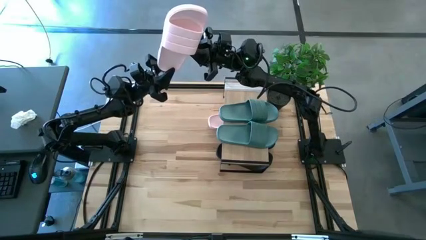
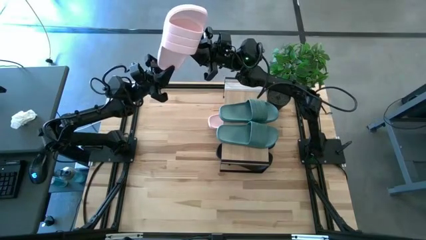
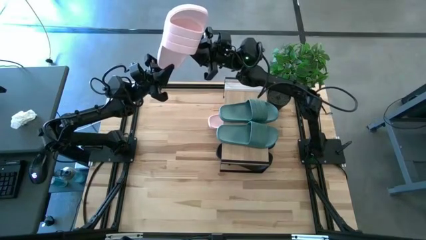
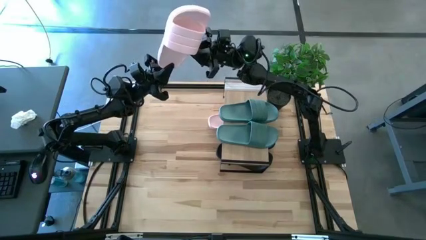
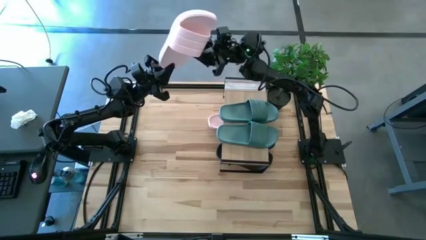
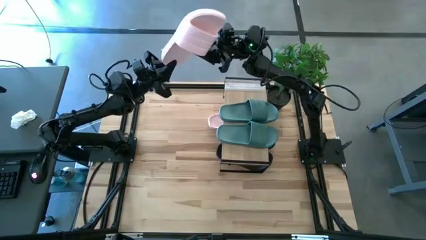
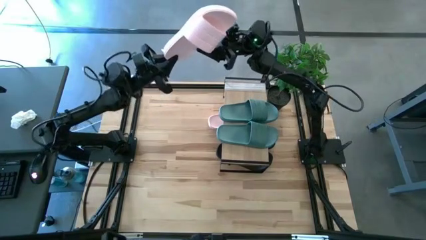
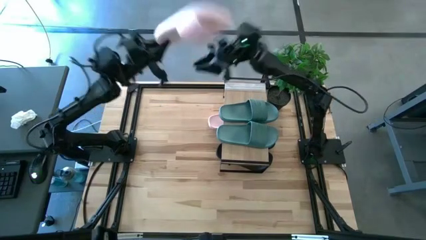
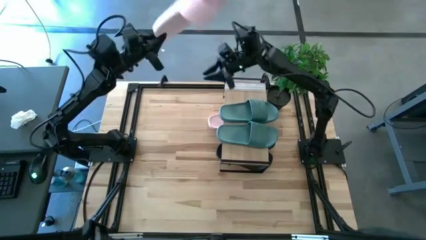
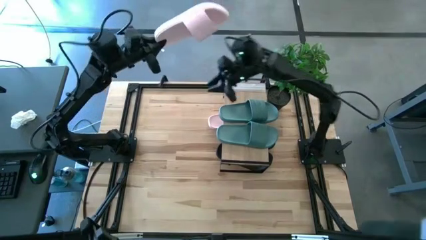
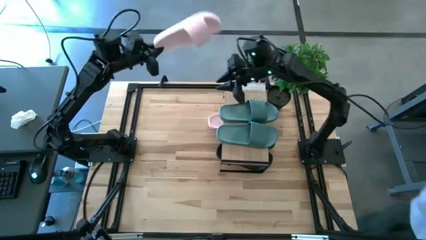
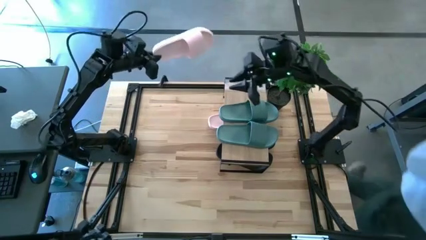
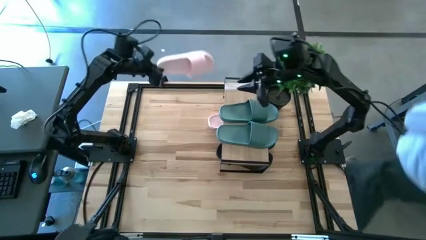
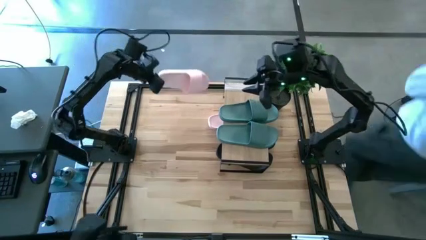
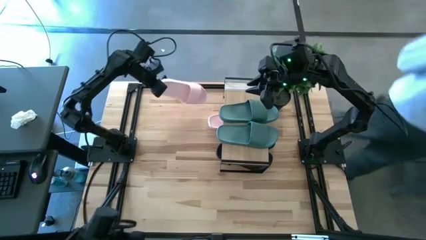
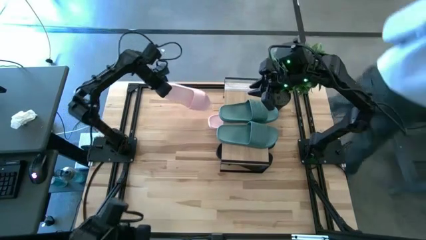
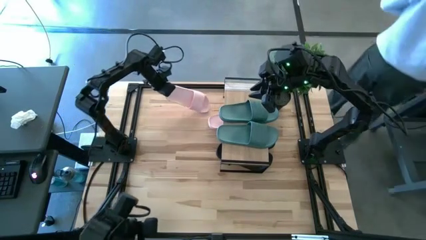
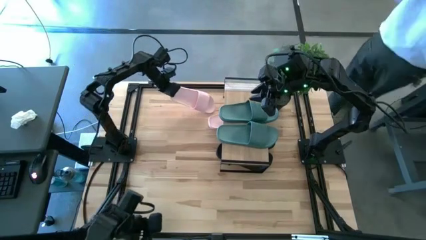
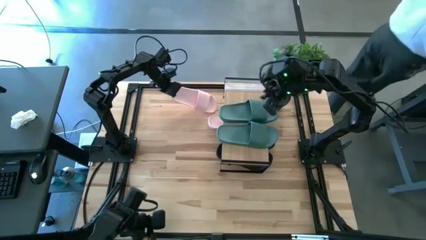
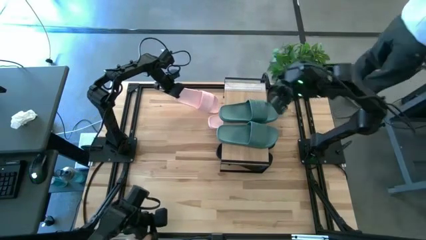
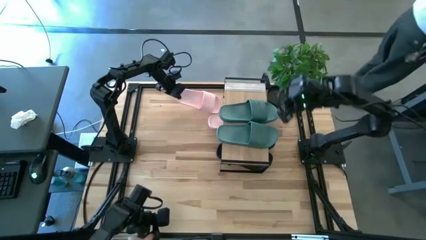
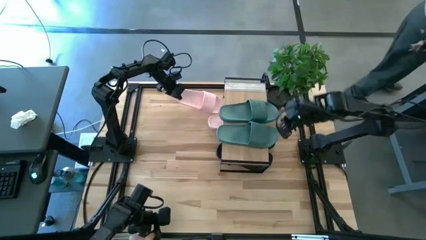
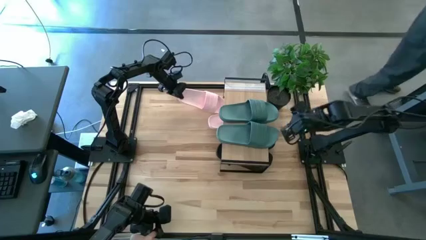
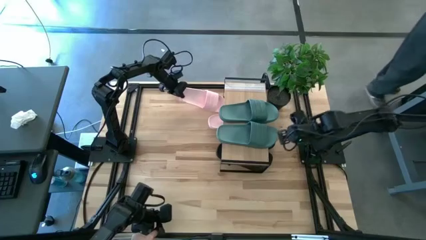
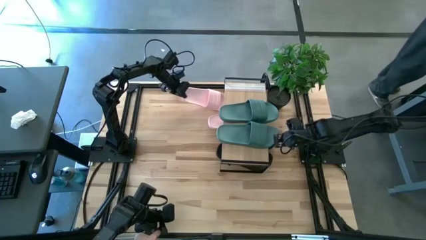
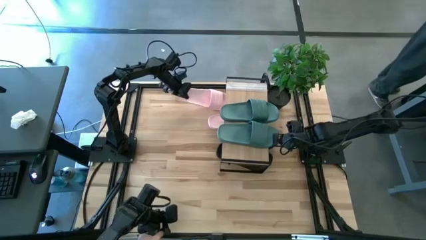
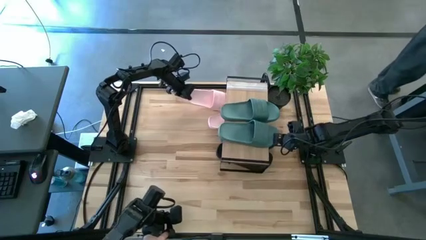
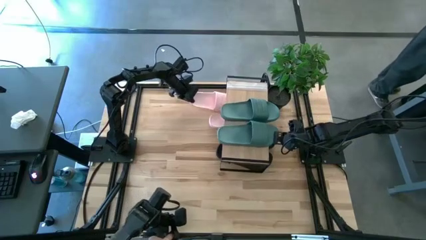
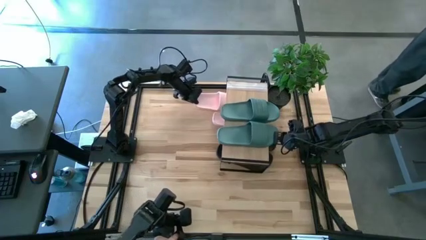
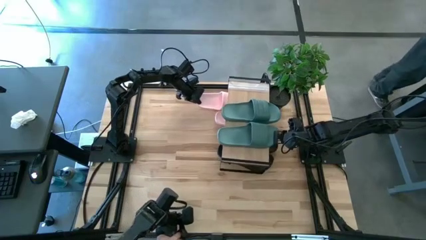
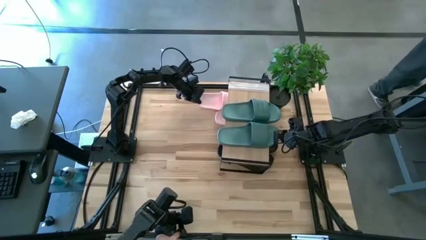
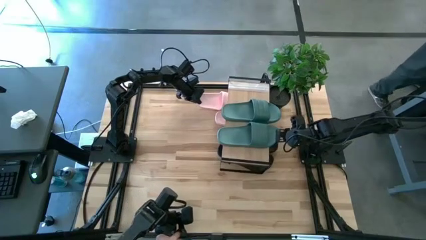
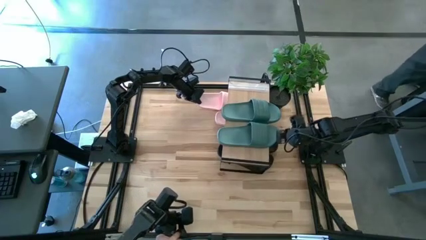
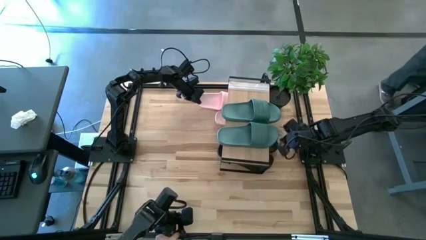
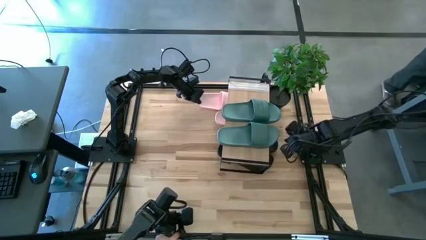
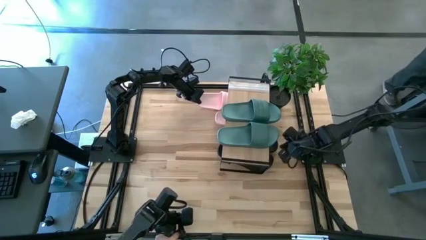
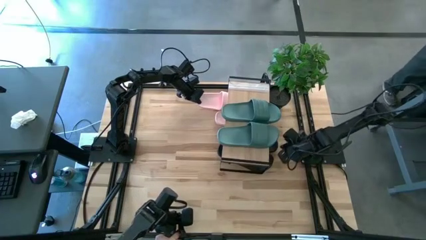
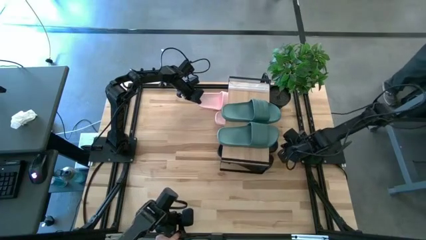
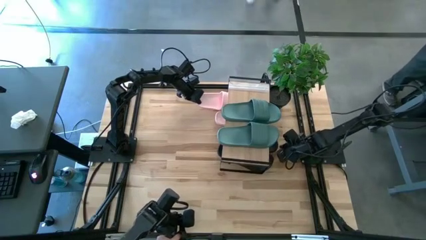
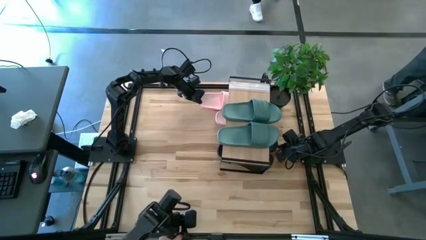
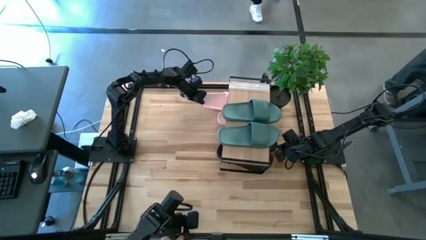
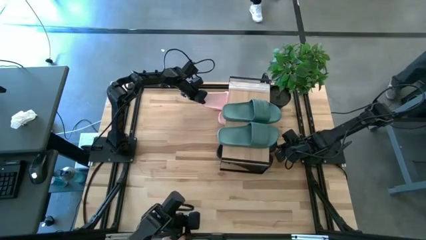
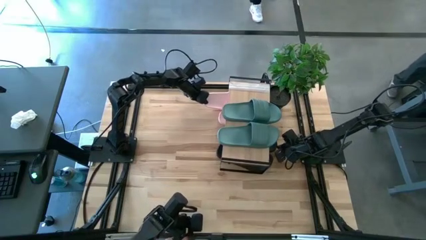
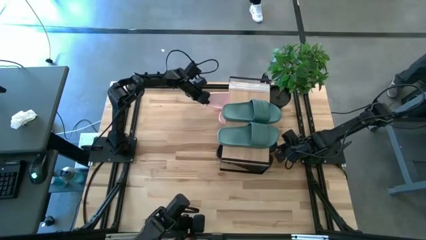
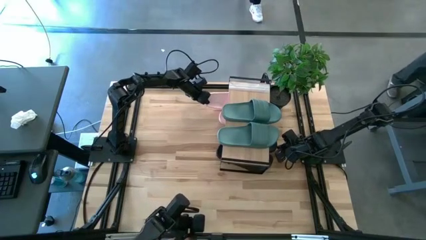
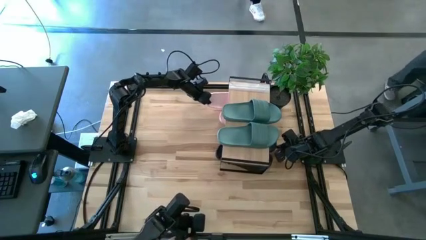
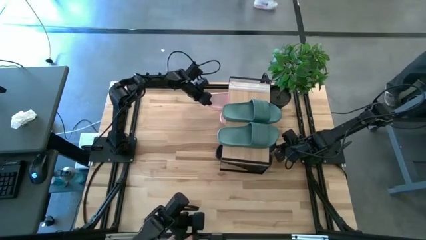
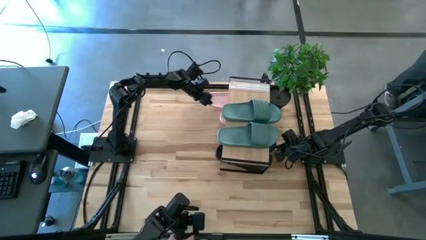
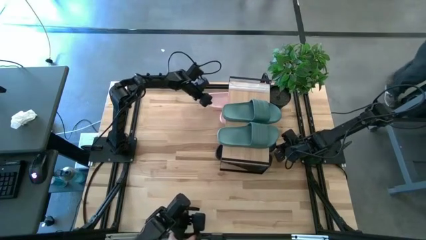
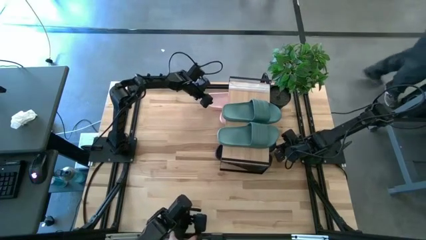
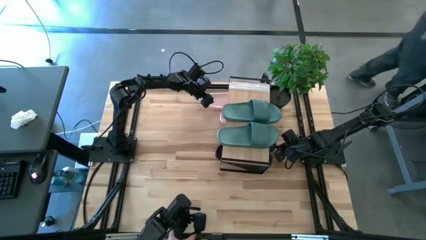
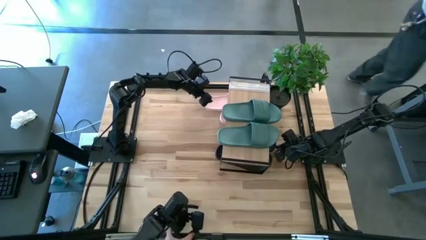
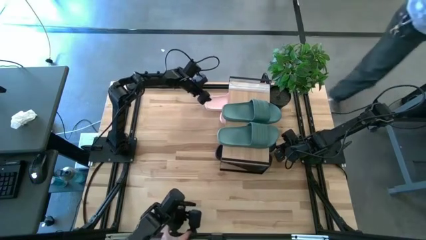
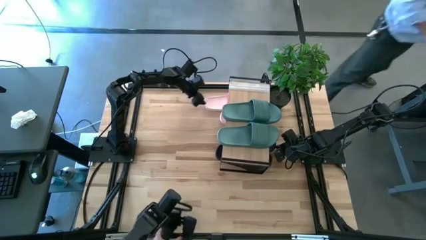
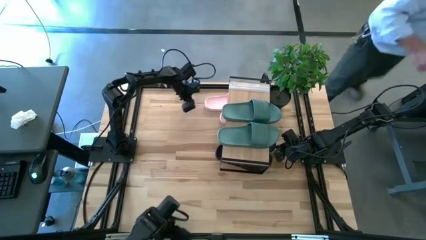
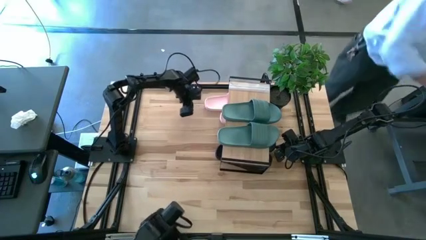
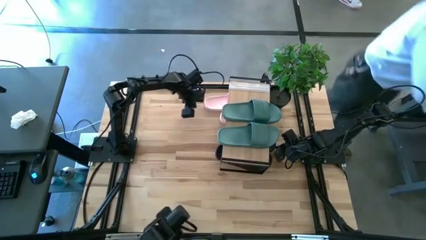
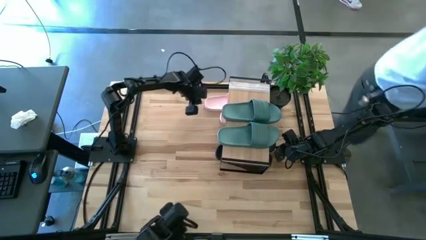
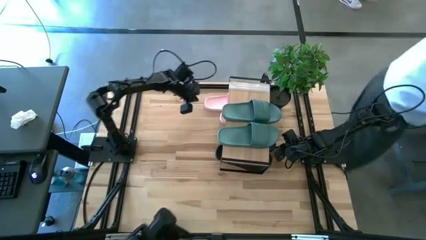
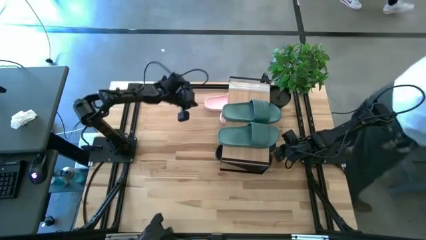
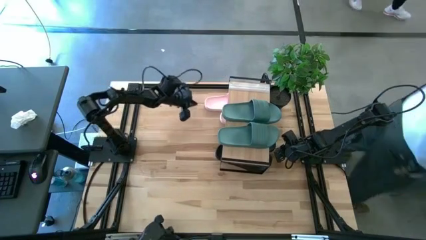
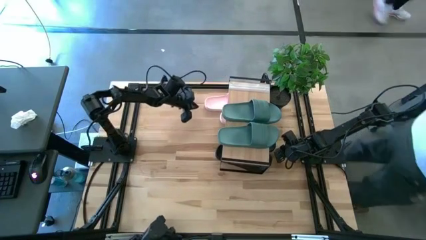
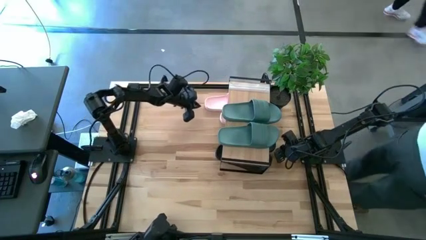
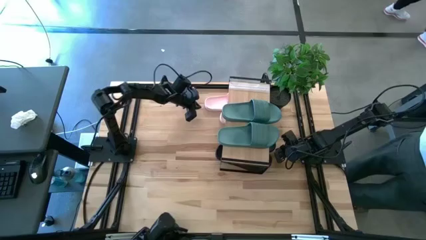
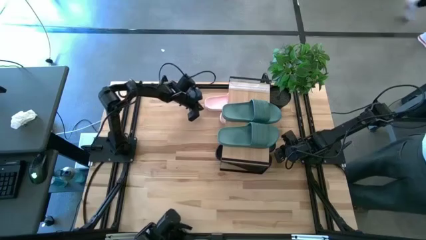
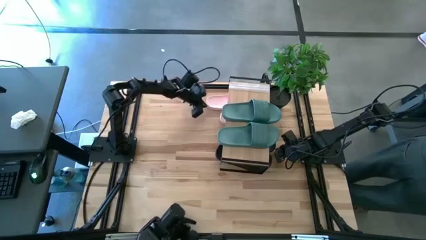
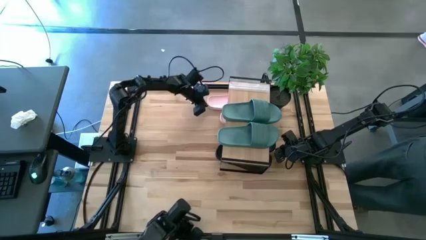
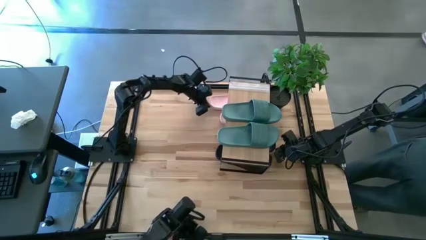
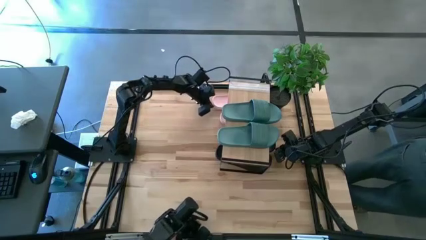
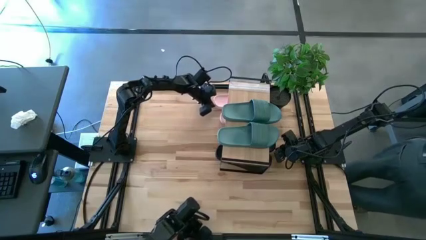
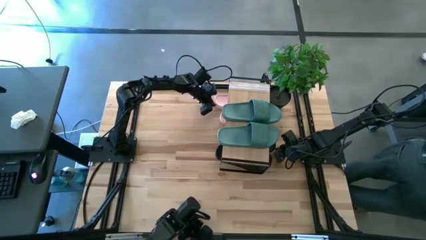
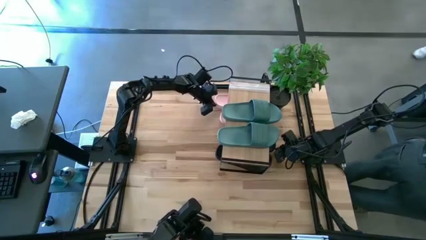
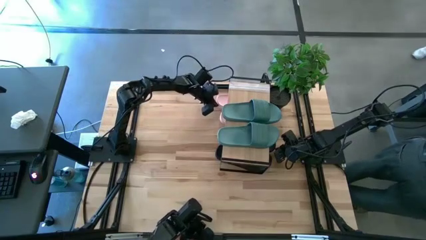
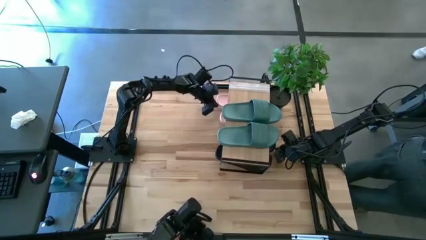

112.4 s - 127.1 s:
Task: Pick and place slides into the shelf
Put the pink slipper under the shelf
